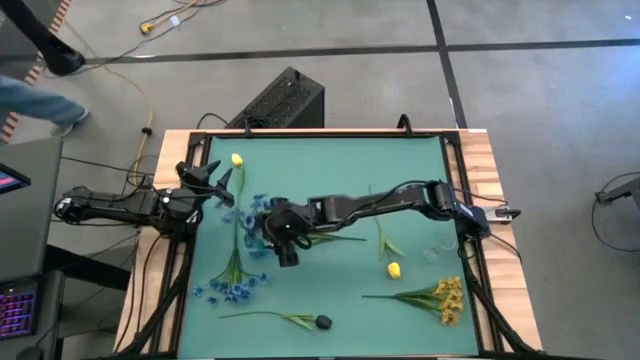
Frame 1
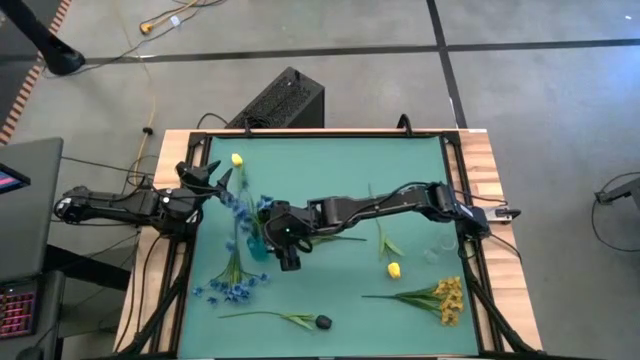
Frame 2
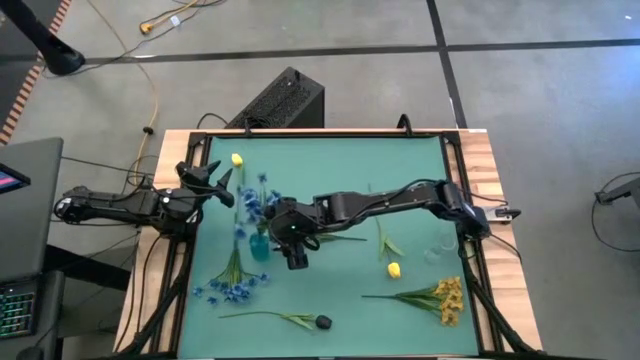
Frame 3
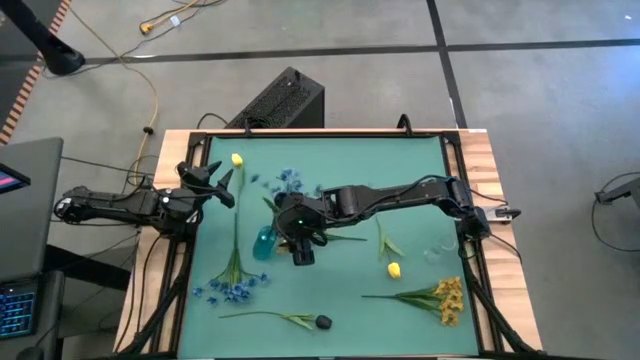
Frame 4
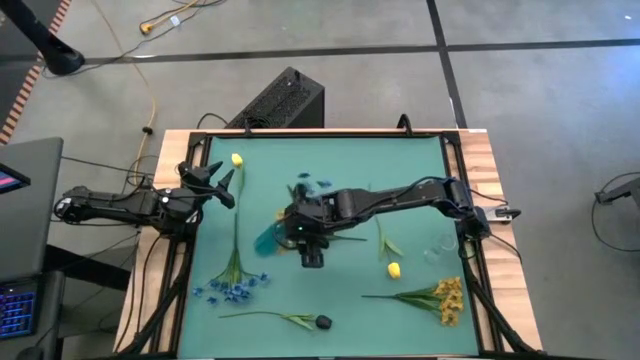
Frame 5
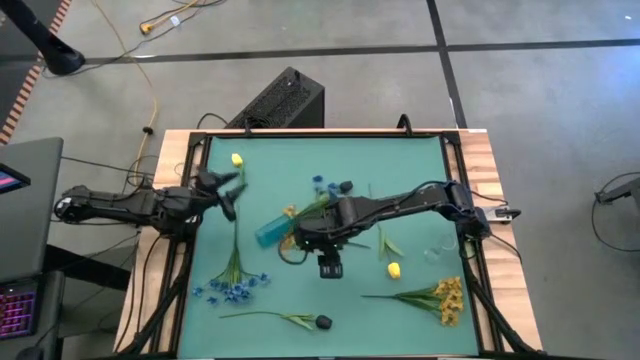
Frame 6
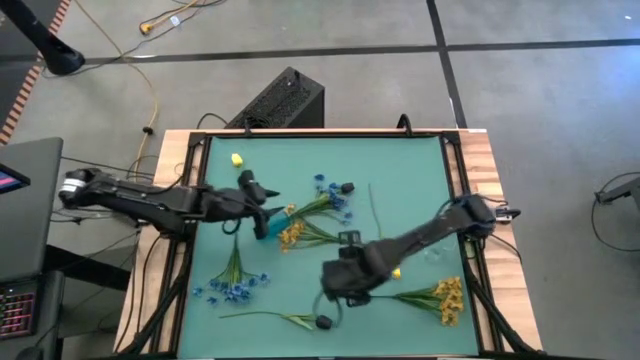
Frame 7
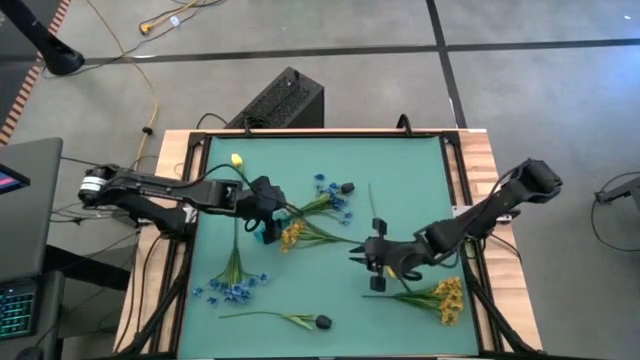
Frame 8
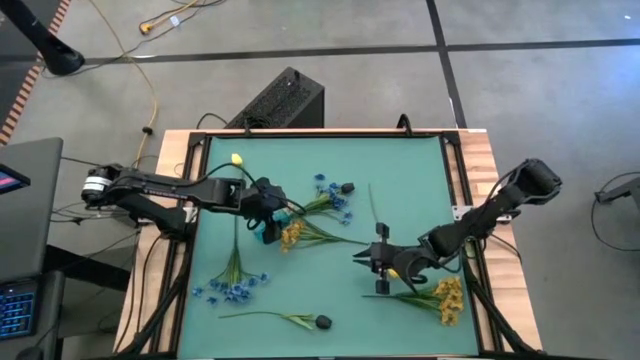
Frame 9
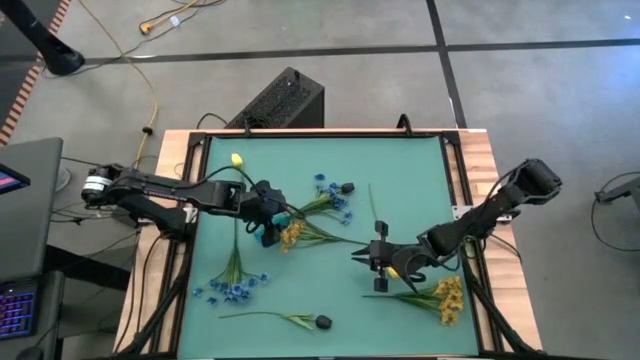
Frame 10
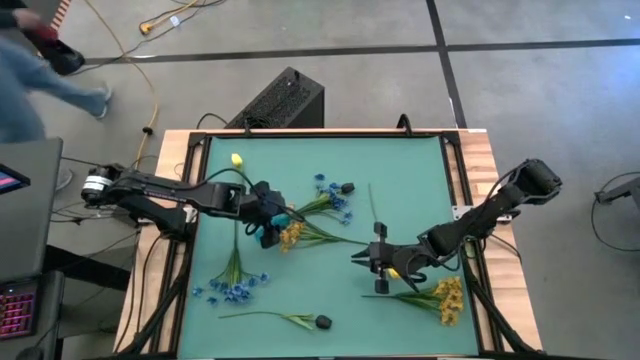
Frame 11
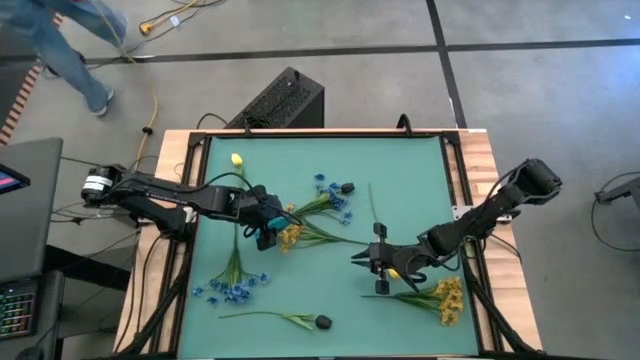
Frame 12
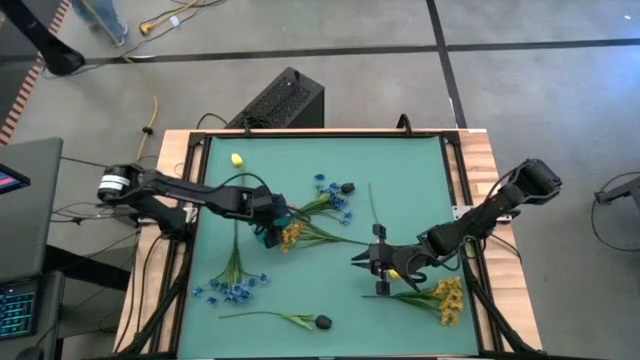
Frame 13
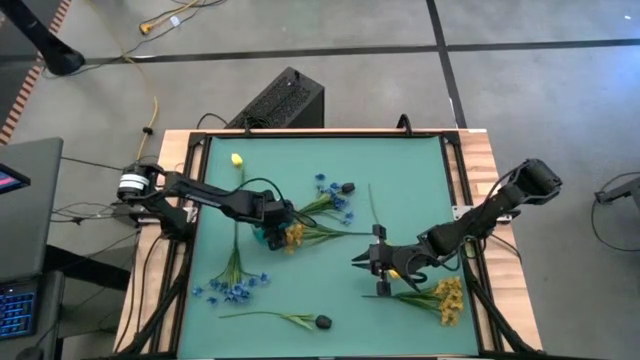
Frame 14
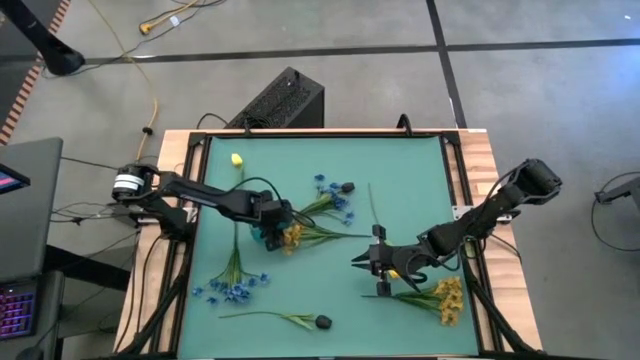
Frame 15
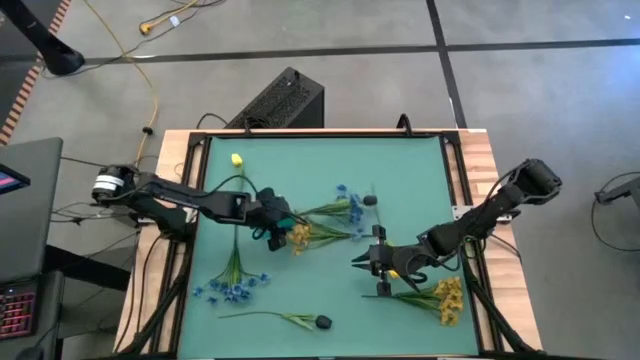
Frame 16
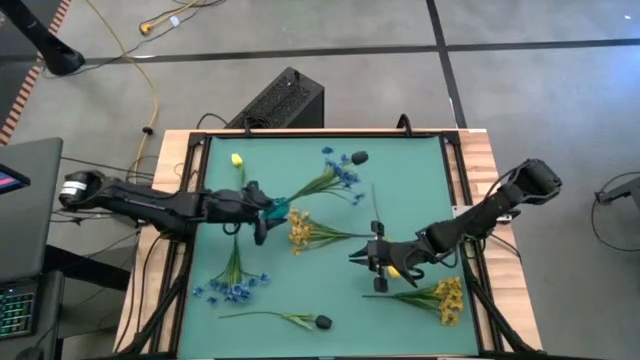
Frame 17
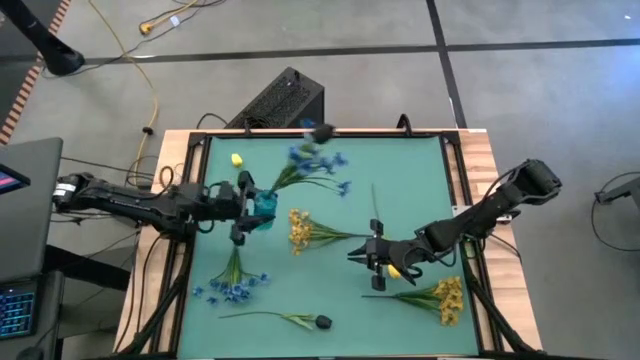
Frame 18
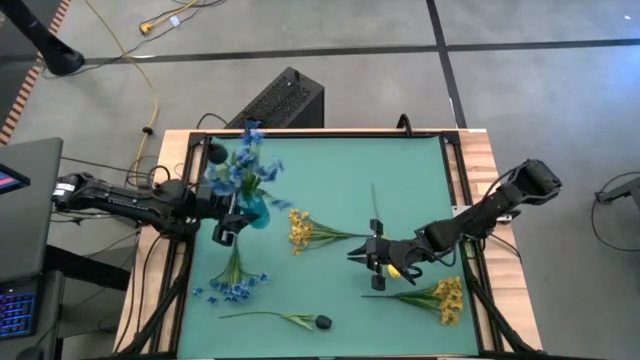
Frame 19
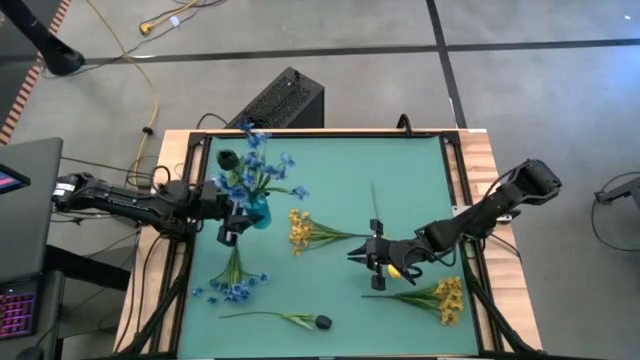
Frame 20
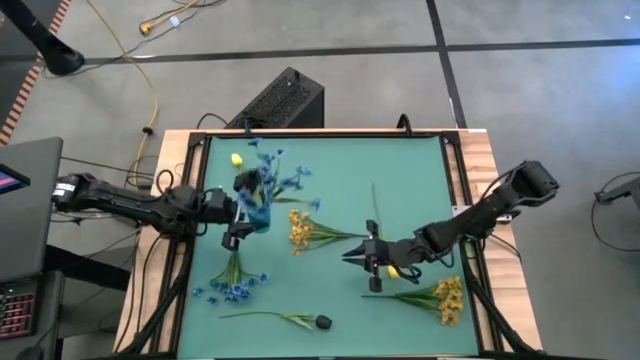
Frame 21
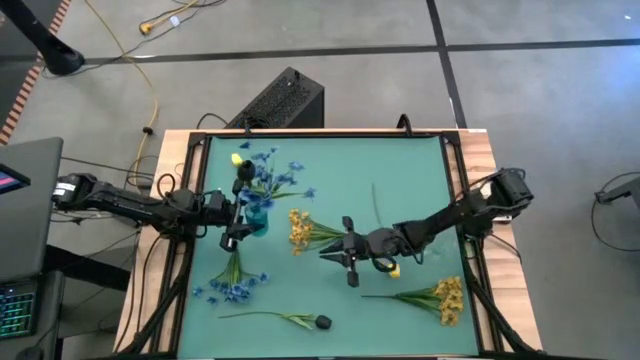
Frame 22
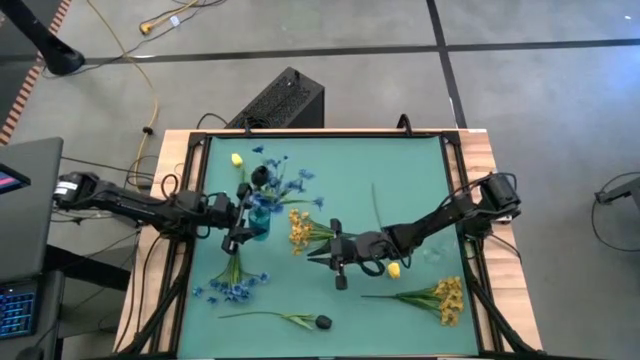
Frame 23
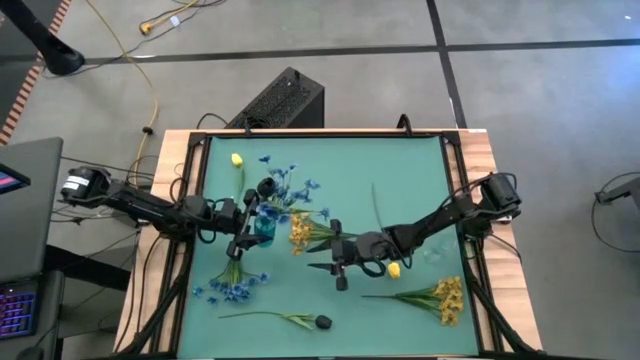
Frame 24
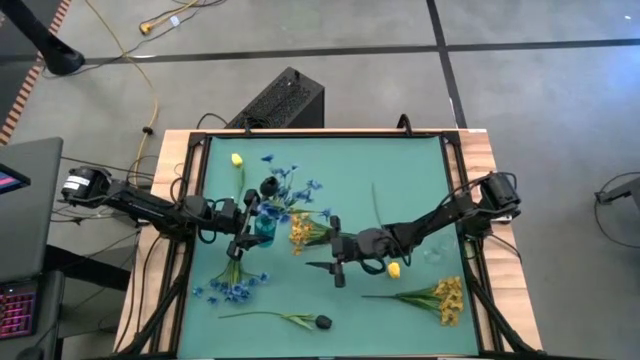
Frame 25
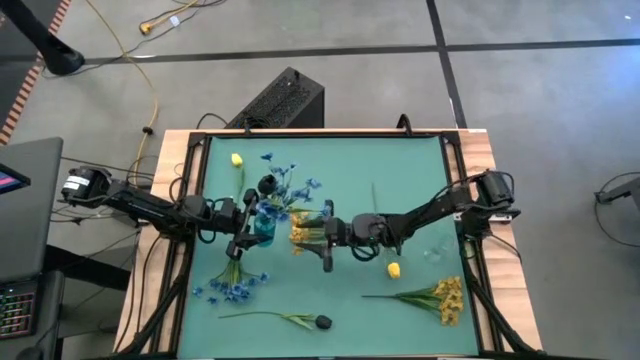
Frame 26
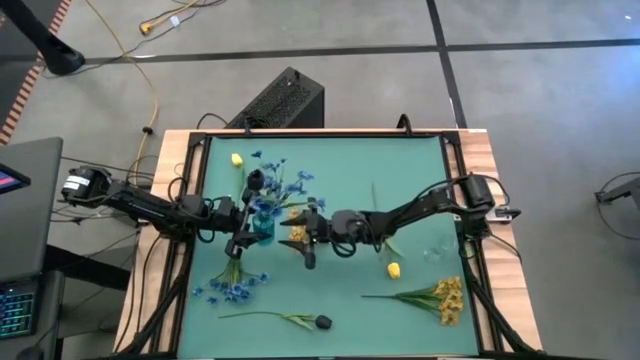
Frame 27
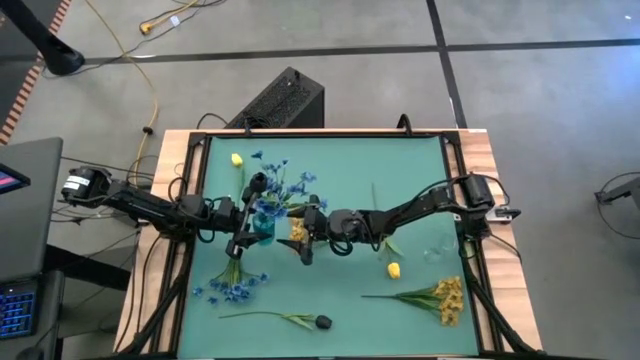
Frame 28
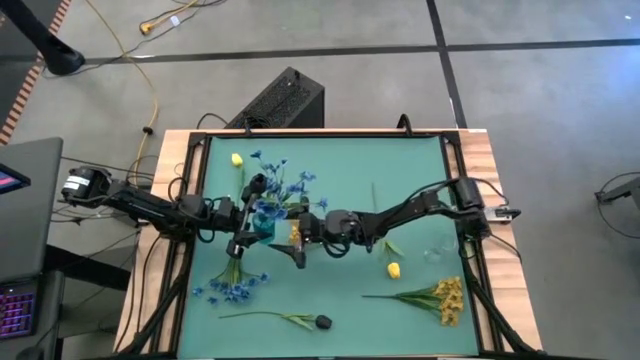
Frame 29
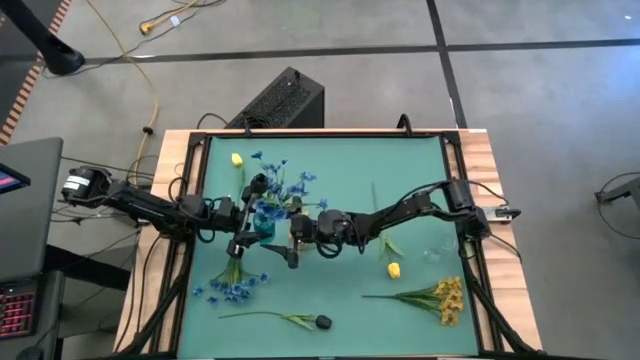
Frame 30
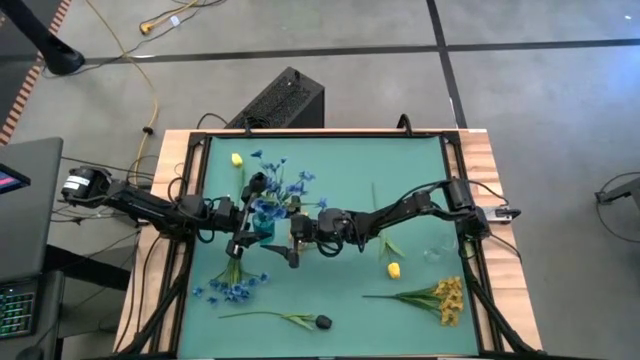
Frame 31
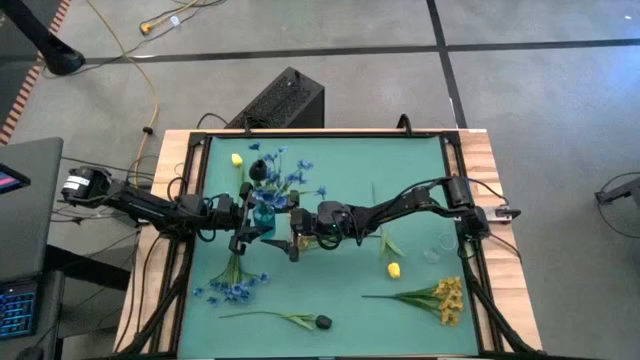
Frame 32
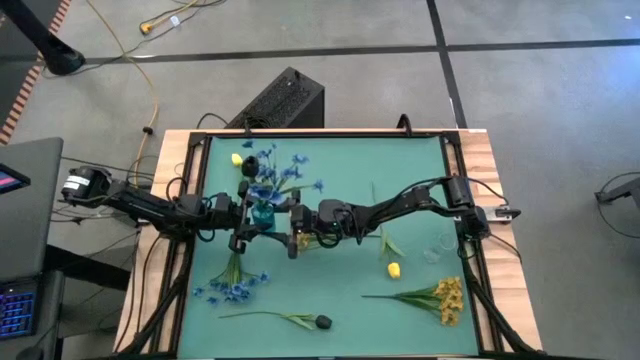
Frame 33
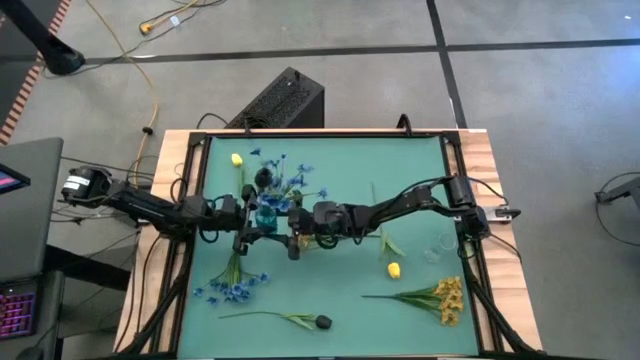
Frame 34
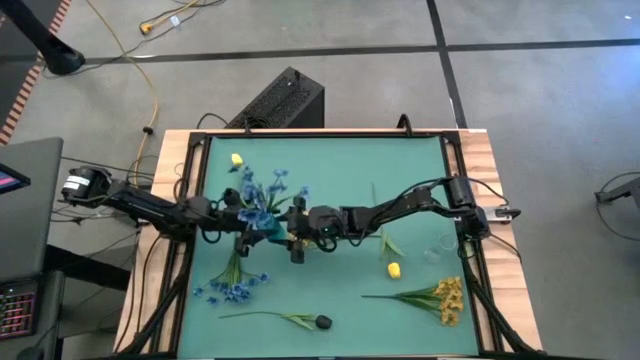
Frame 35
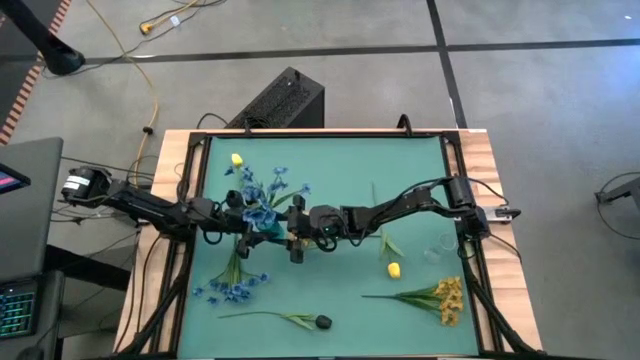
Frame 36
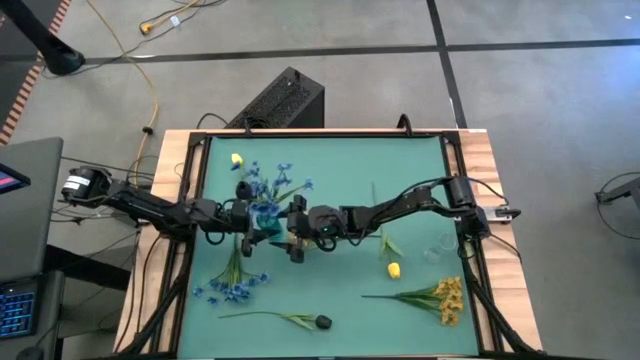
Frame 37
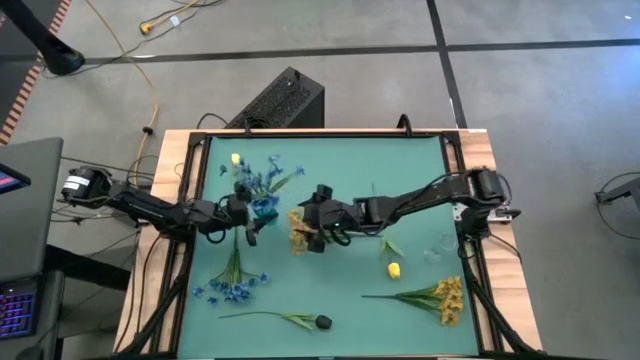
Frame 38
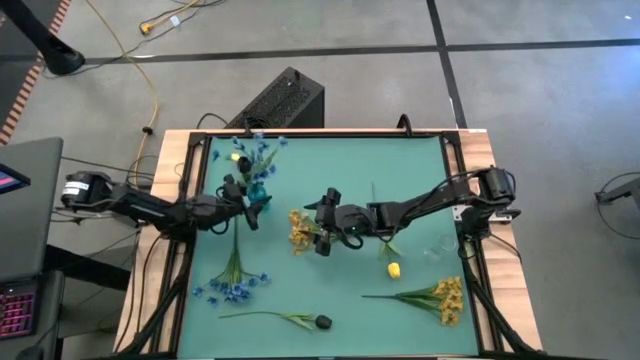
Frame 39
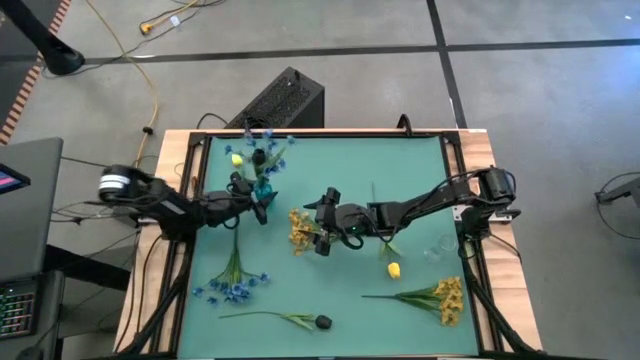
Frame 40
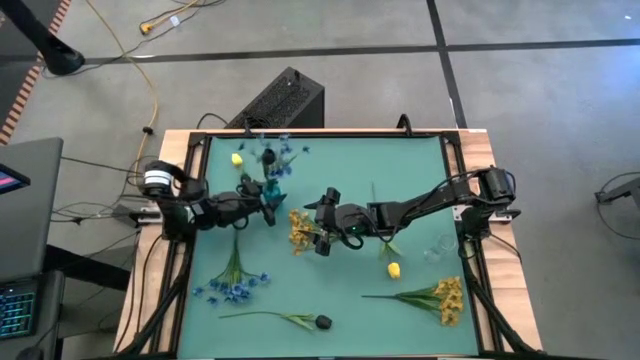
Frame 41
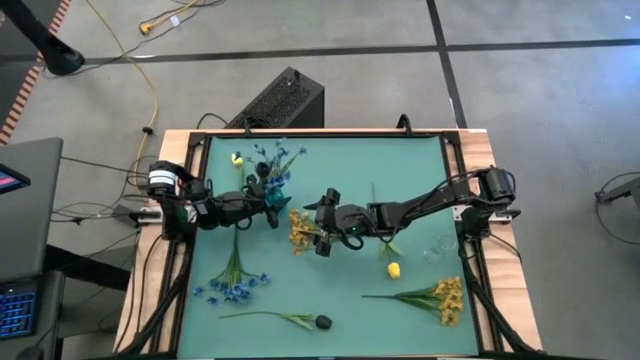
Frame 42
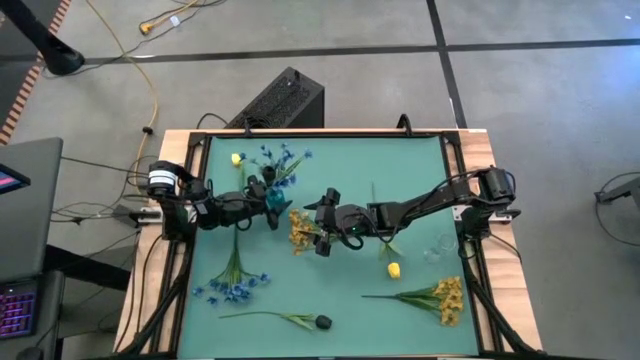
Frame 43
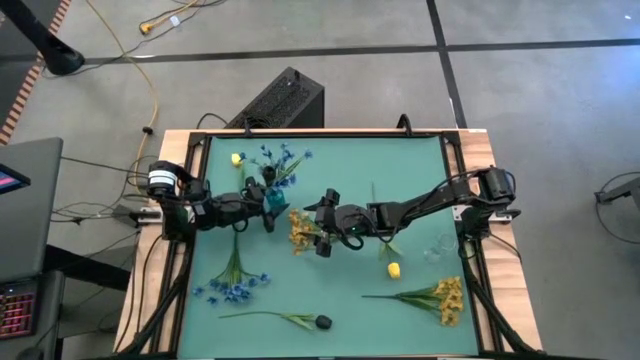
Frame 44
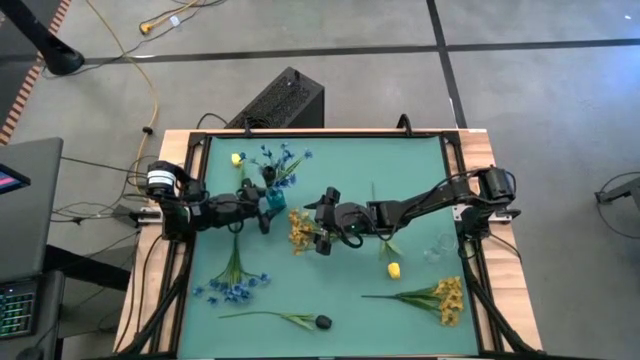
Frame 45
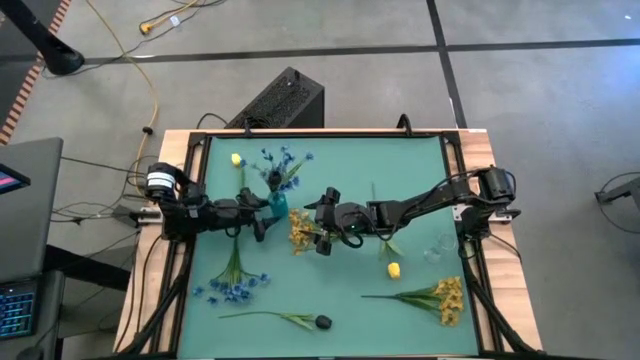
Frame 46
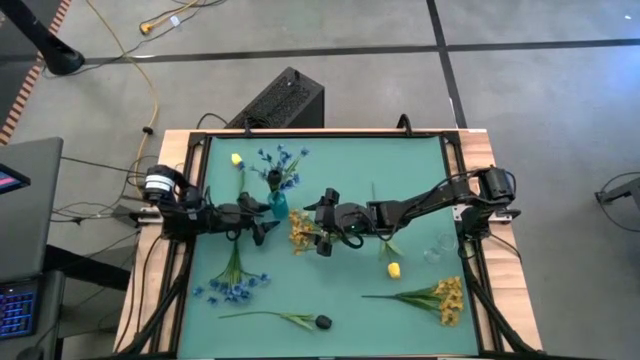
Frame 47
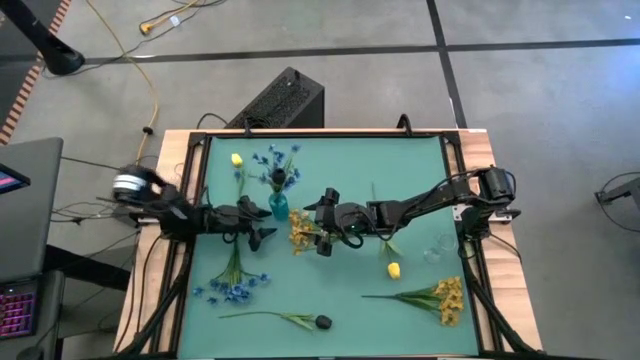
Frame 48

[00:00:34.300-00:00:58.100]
Task: Sort flowers into vase by color
Adjust the blue vase
